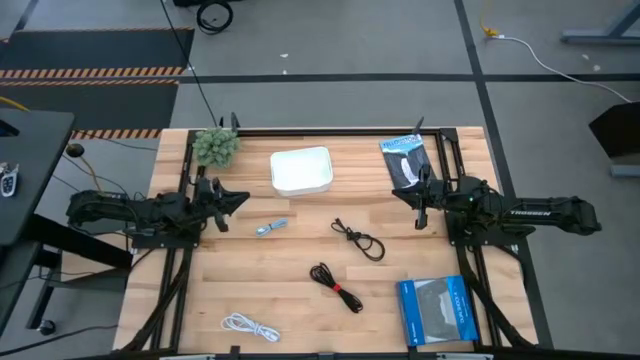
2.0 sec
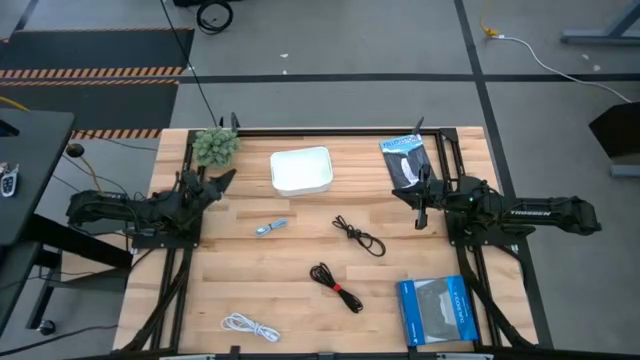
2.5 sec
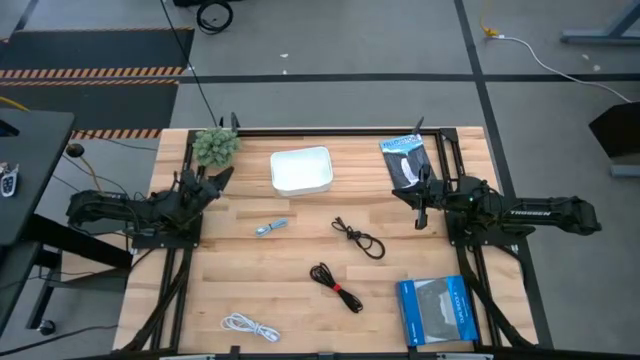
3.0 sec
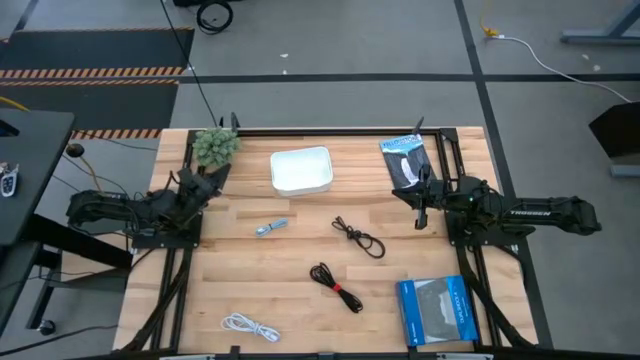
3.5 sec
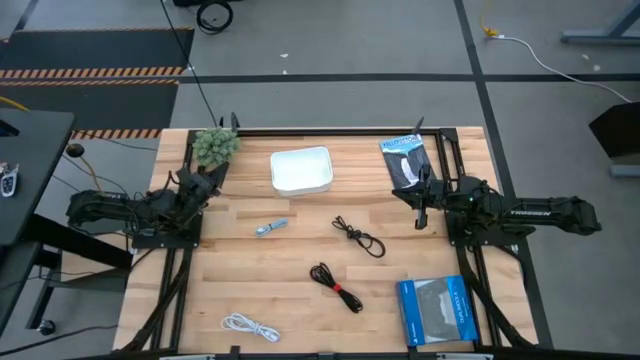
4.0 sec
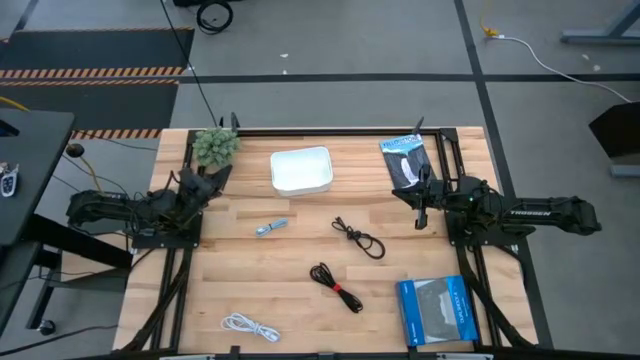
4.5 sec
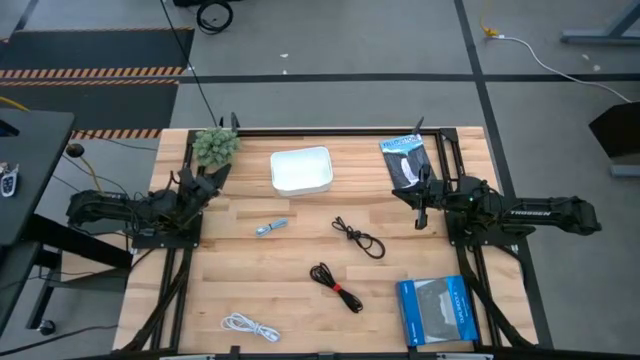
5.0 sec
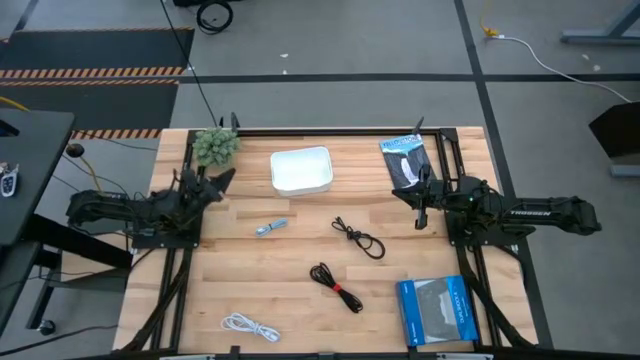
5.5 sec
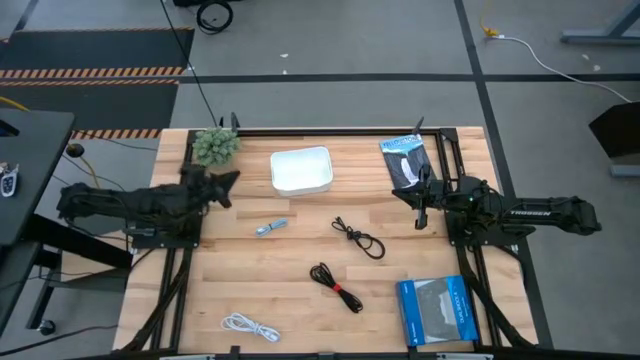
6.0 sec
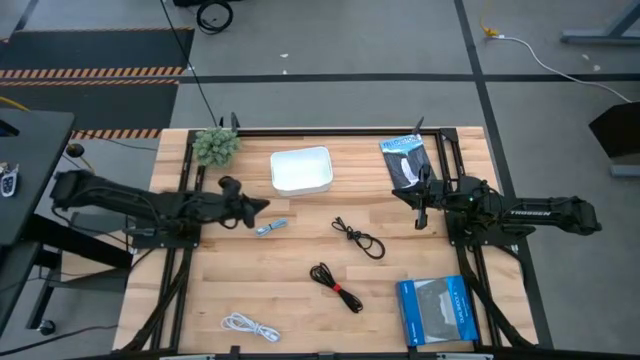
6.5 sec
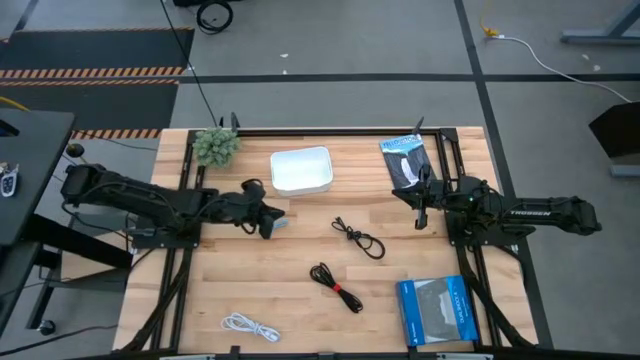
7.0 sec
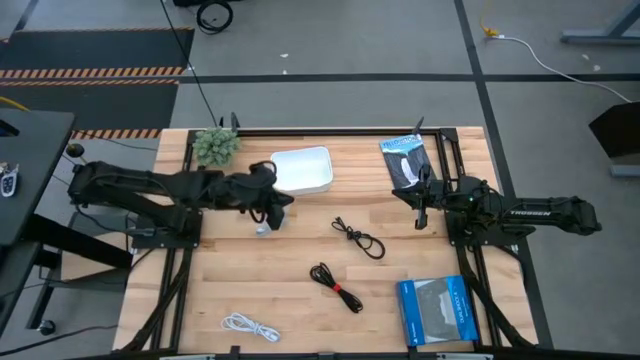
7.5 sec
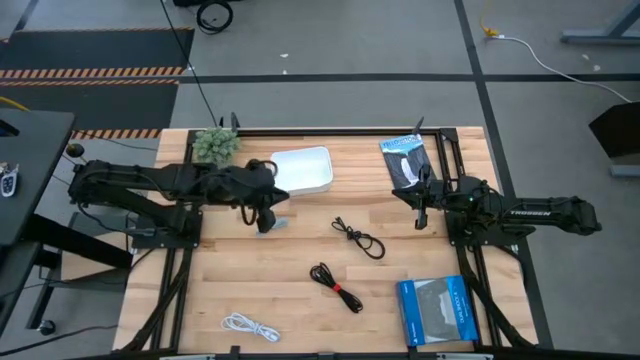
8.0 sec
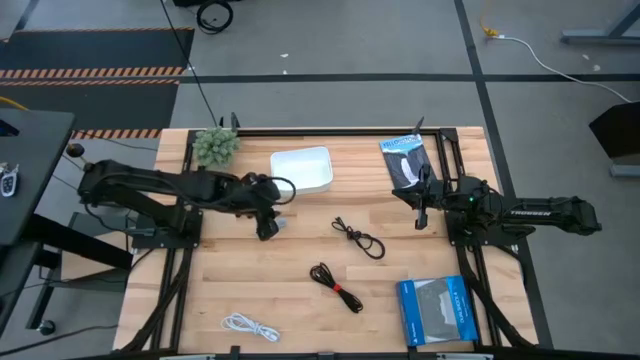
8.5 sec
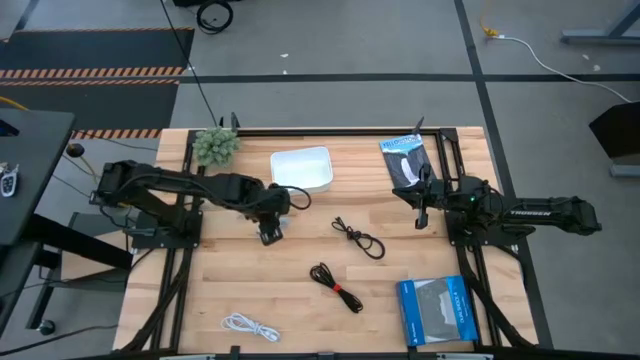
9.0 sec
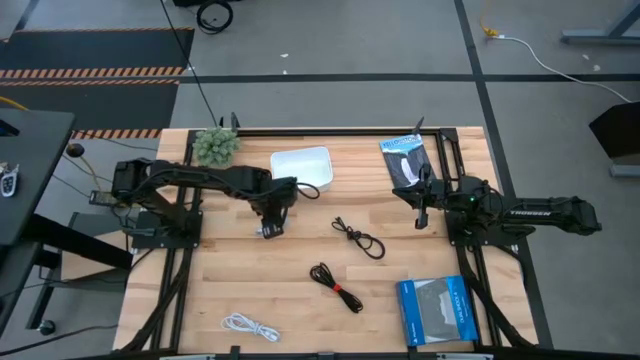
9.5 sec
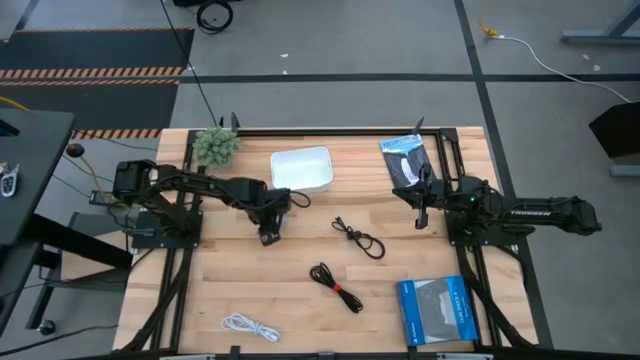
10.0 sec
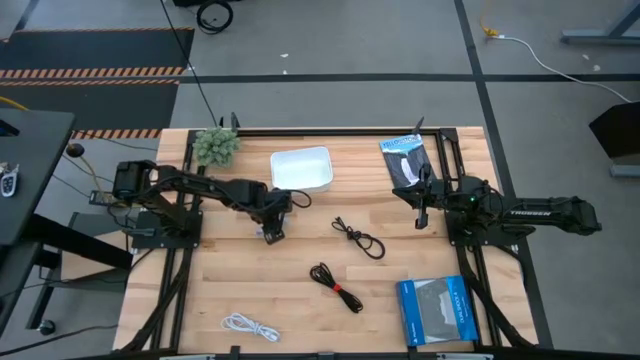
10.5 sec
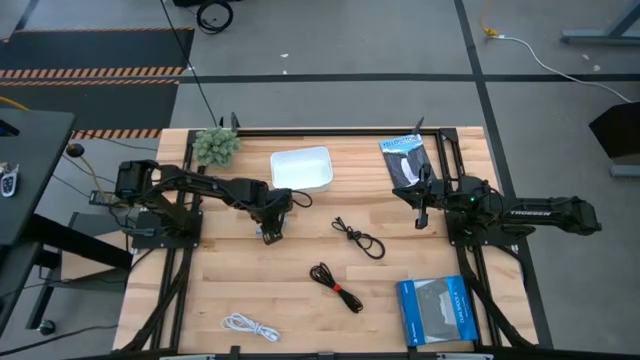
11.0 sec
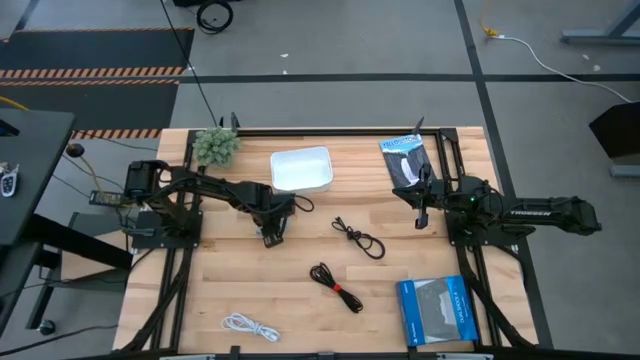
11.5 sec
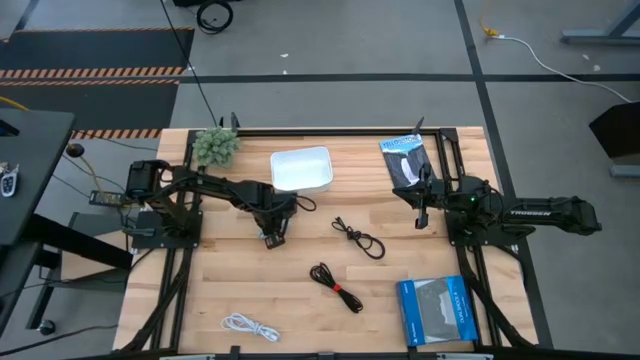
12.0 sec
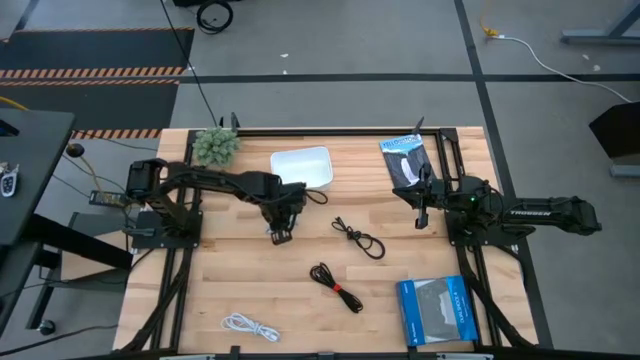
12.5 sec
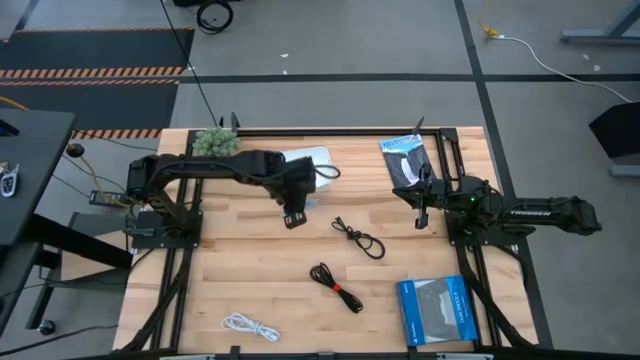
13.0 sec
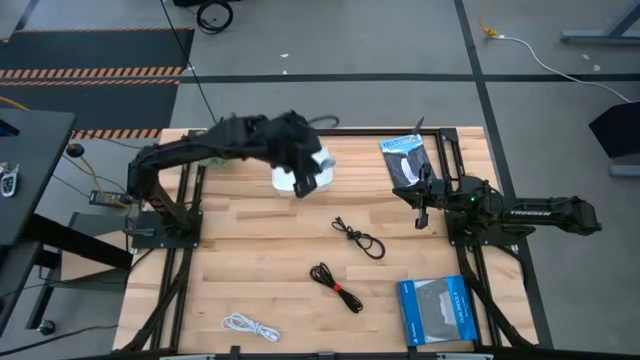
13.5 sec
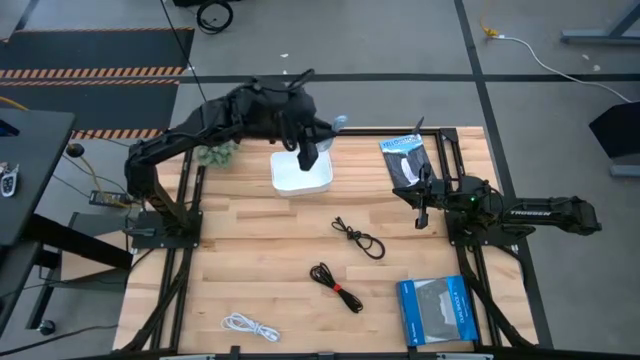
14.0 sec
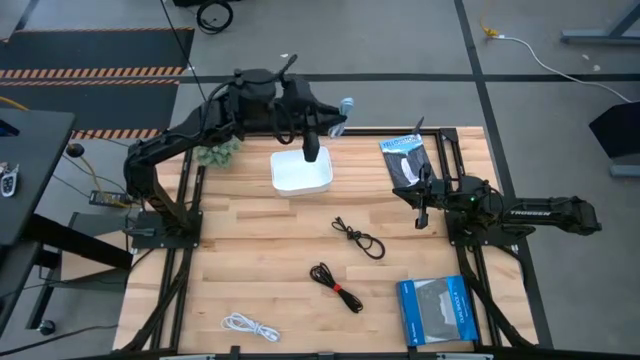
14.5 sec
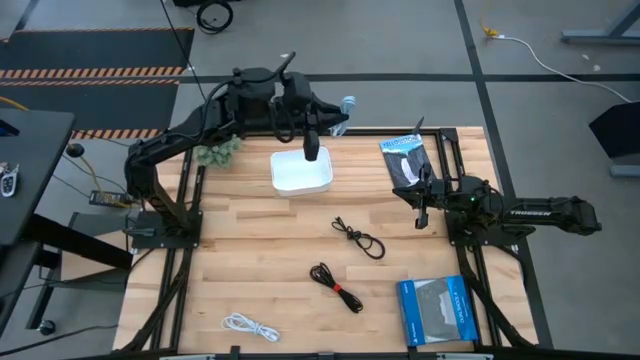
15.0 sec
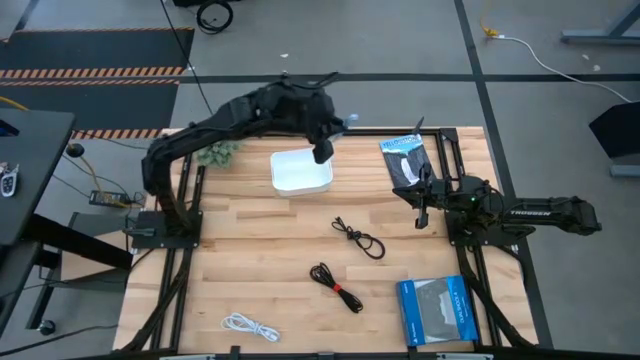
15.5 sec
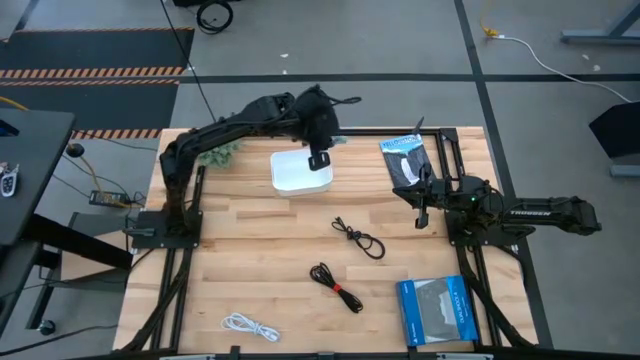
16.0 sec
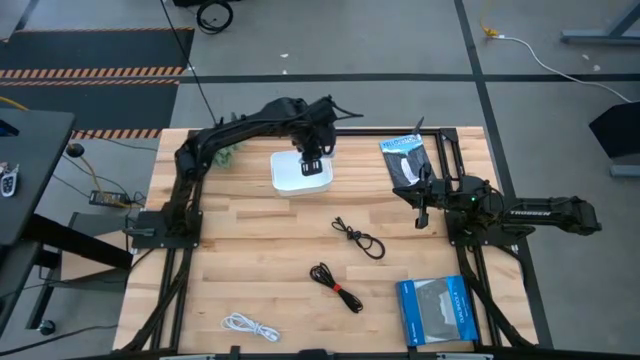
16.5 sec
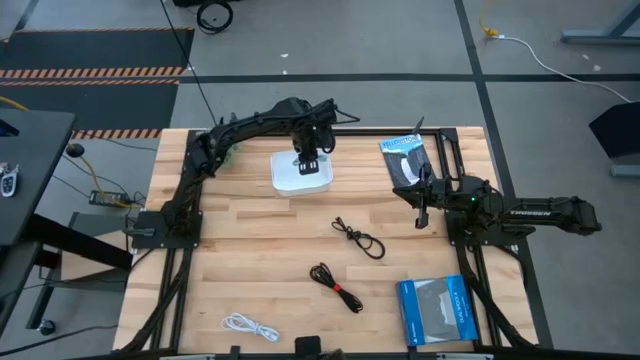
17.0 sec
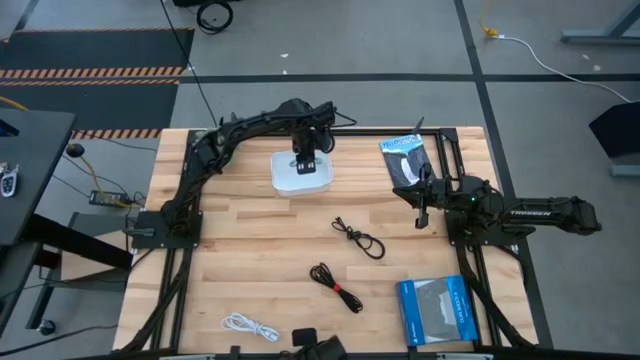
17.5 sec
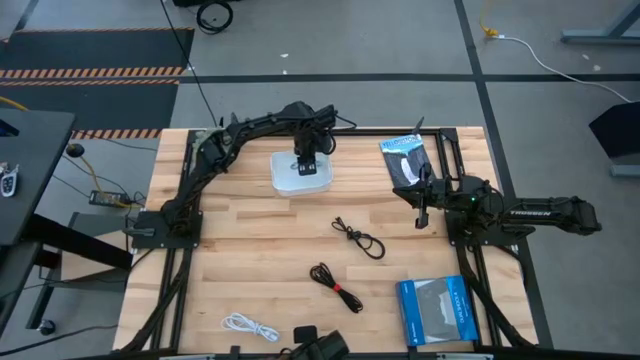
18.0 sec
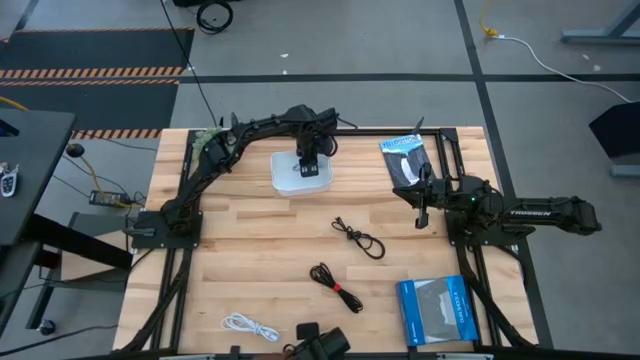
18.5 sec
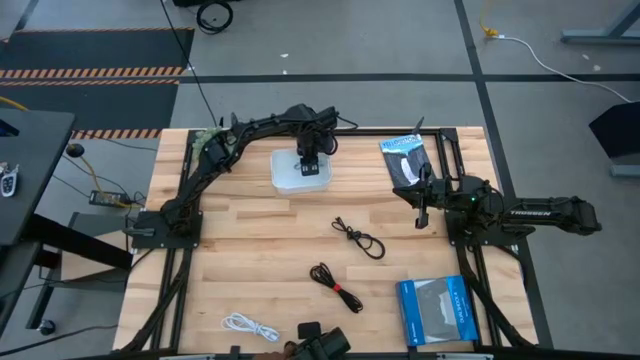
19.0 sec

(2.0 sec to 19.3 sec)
Task: Pick and place USB-C Cables
Put the blue charger cable into the white bin
